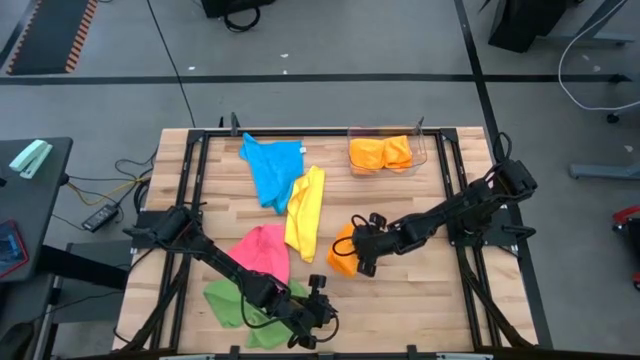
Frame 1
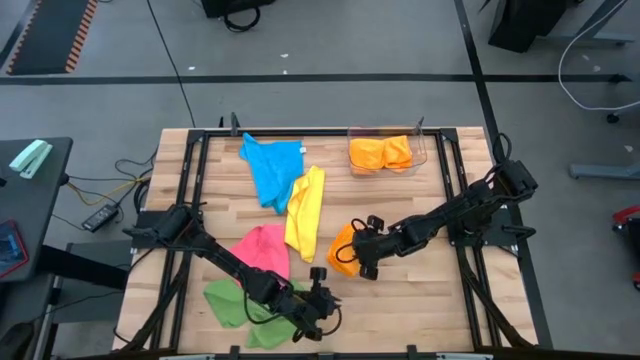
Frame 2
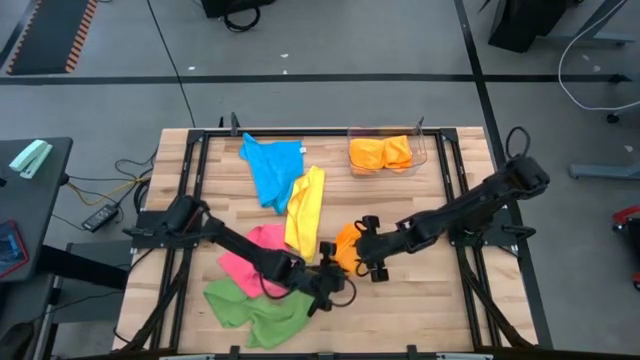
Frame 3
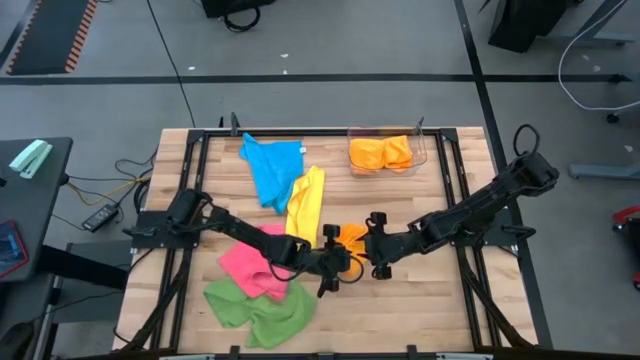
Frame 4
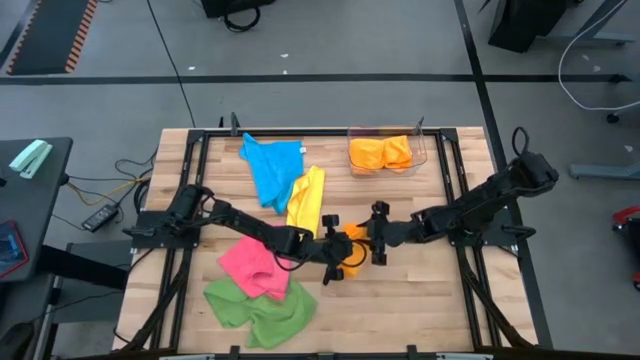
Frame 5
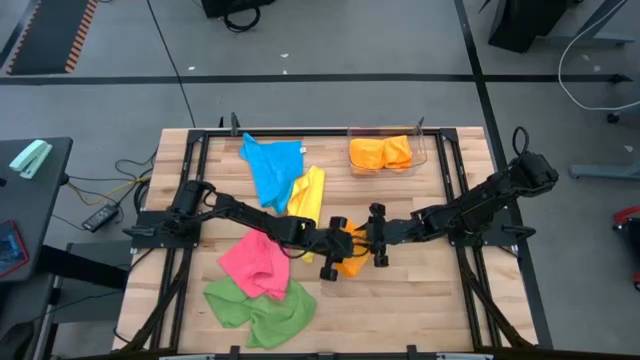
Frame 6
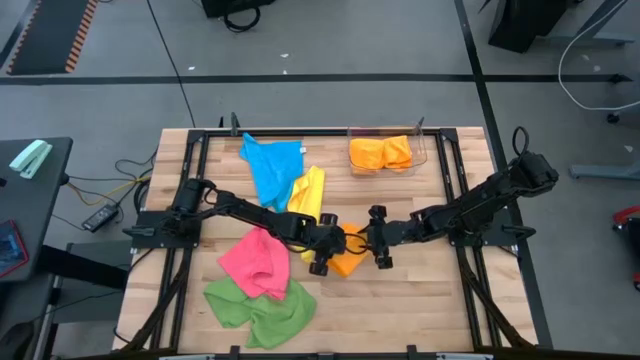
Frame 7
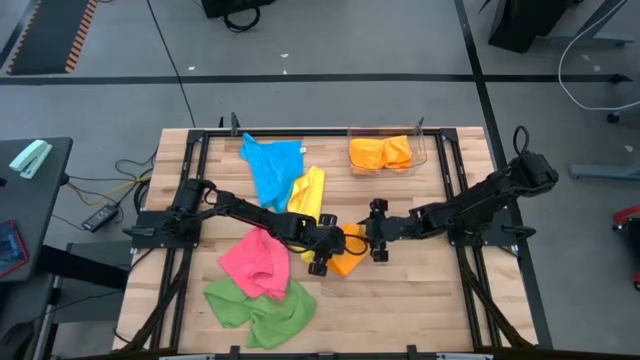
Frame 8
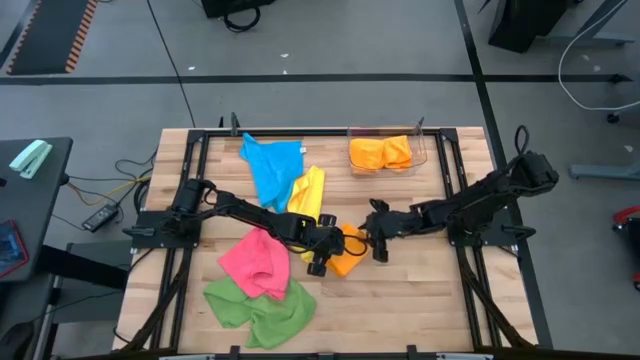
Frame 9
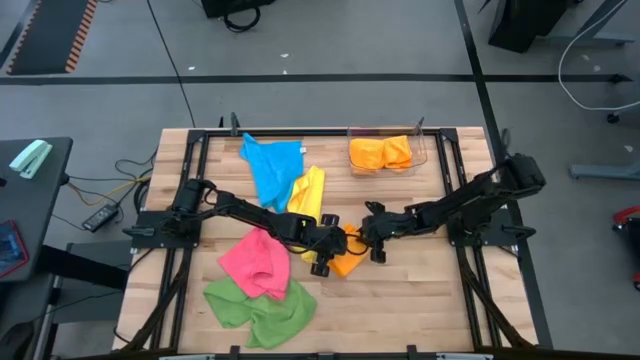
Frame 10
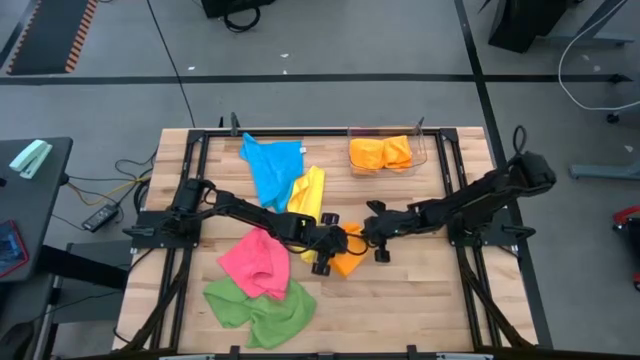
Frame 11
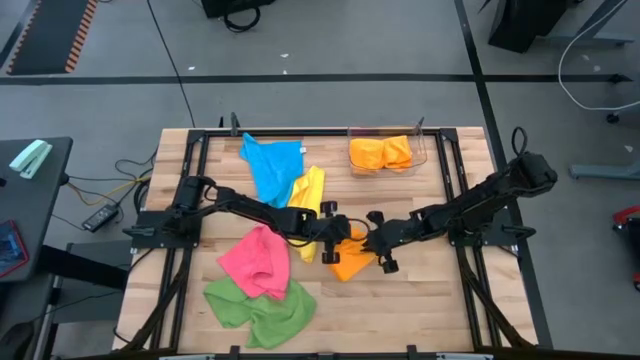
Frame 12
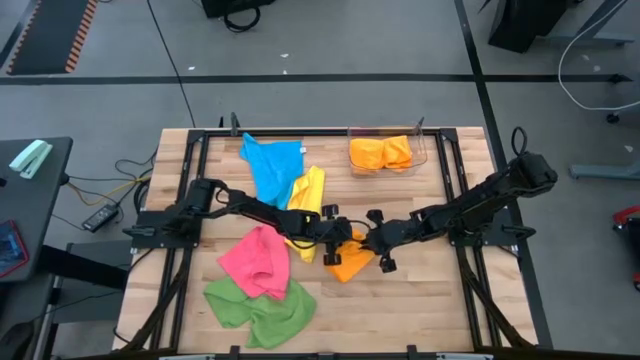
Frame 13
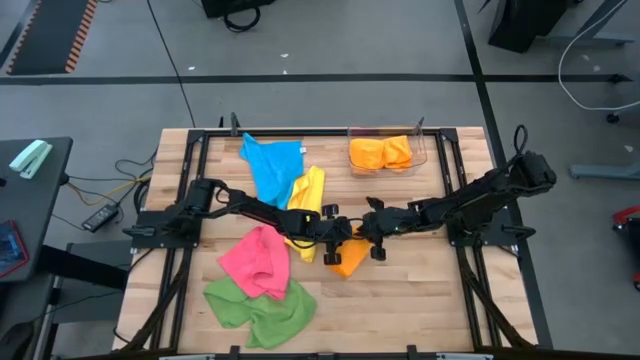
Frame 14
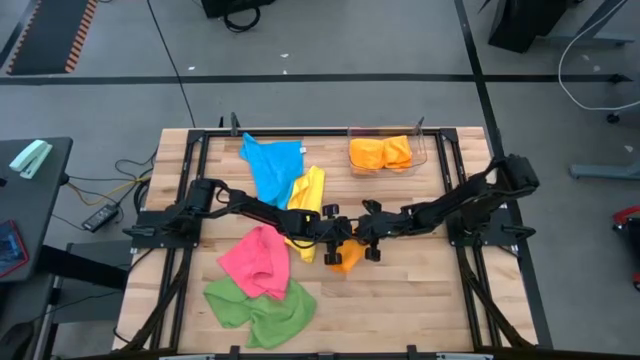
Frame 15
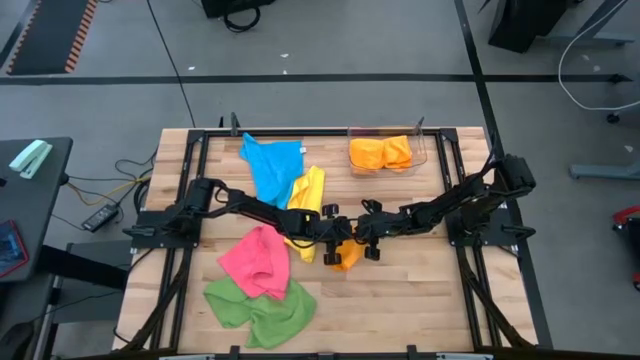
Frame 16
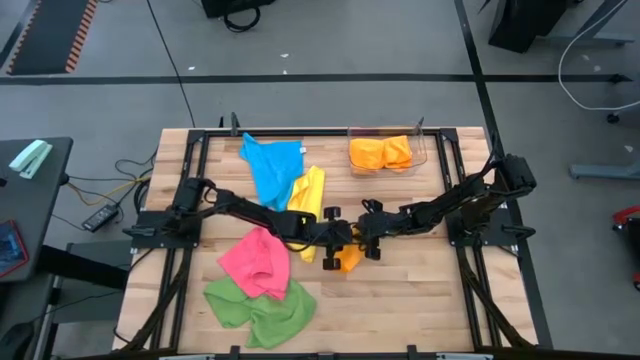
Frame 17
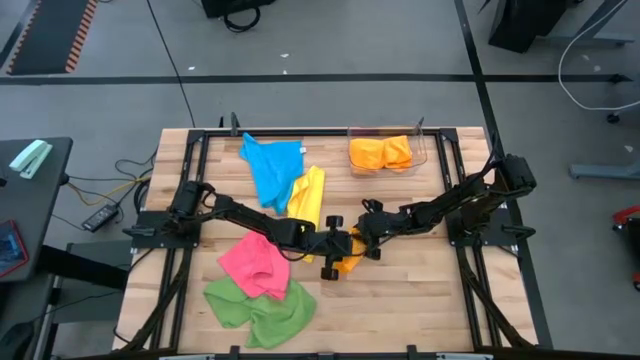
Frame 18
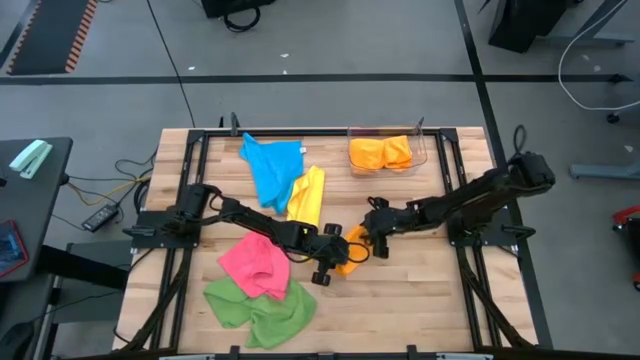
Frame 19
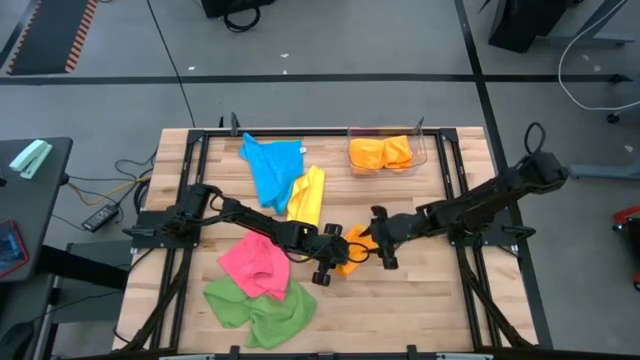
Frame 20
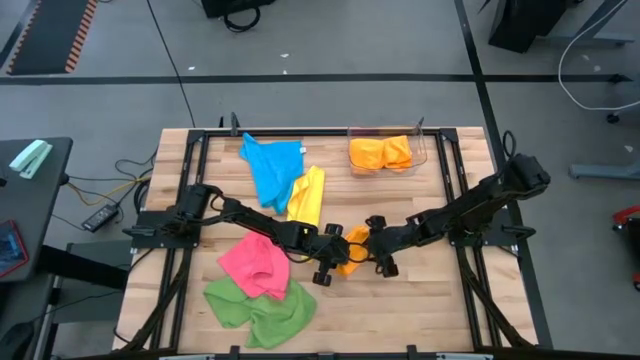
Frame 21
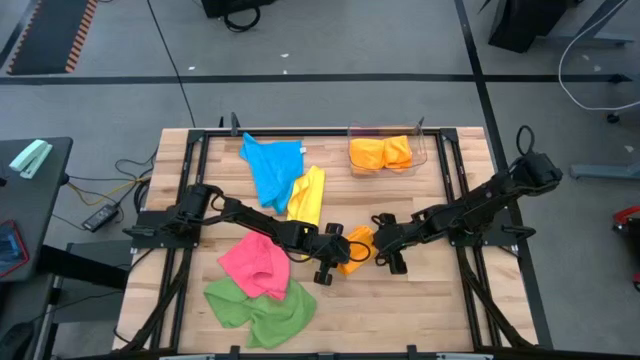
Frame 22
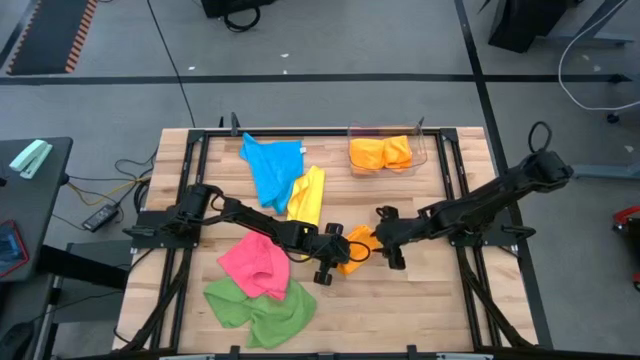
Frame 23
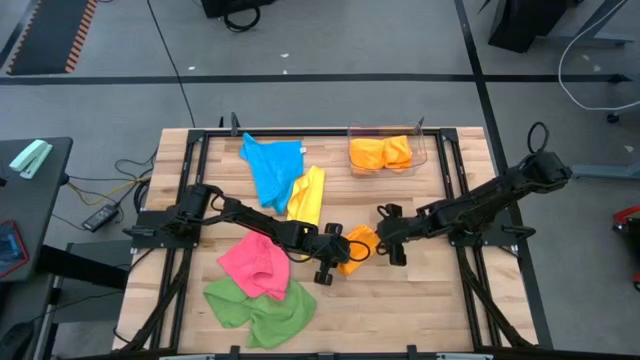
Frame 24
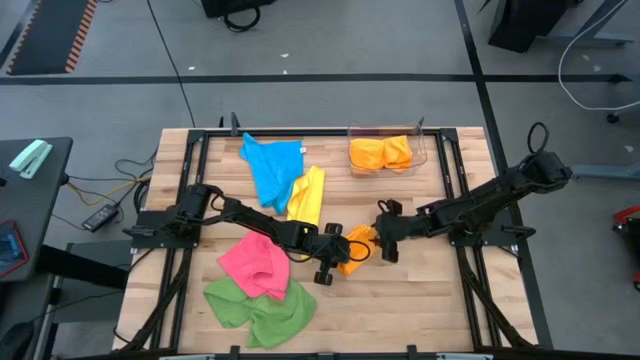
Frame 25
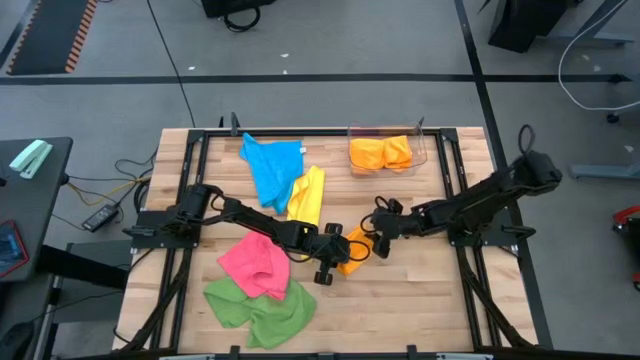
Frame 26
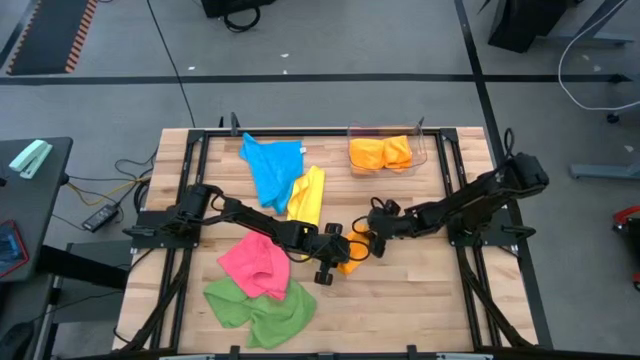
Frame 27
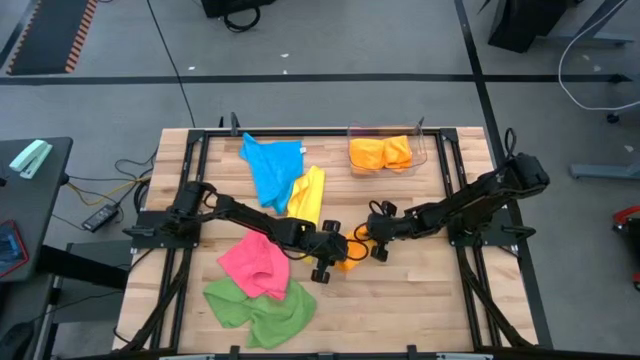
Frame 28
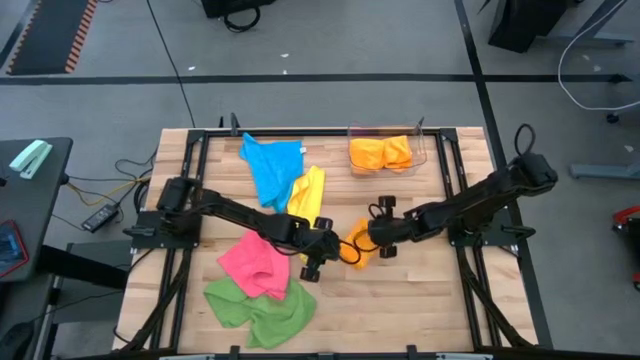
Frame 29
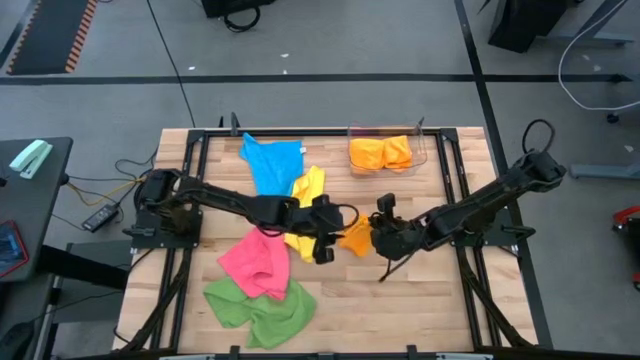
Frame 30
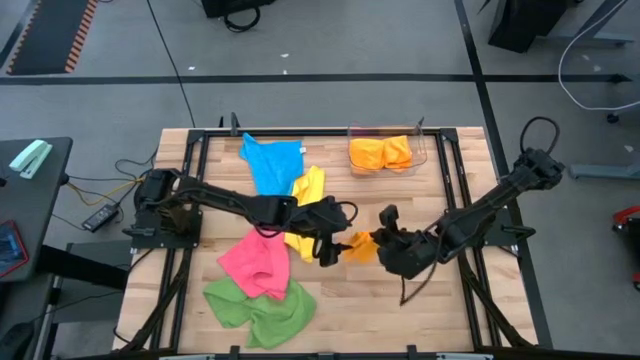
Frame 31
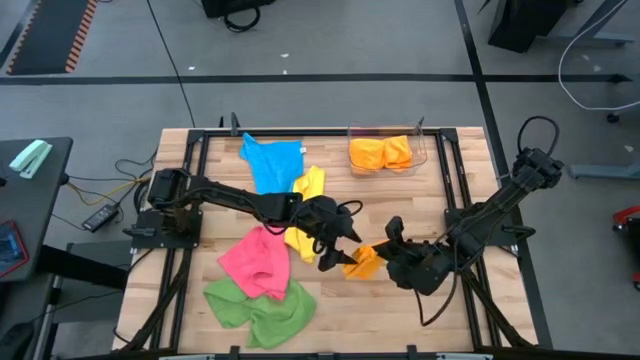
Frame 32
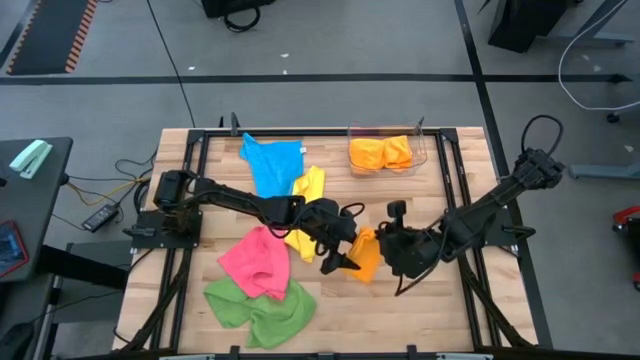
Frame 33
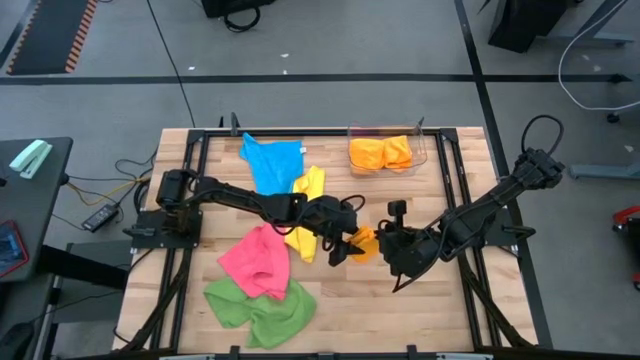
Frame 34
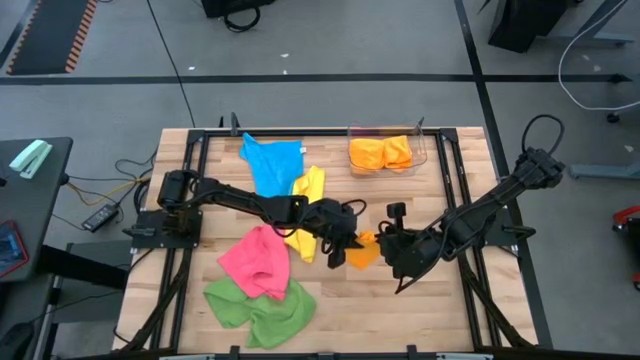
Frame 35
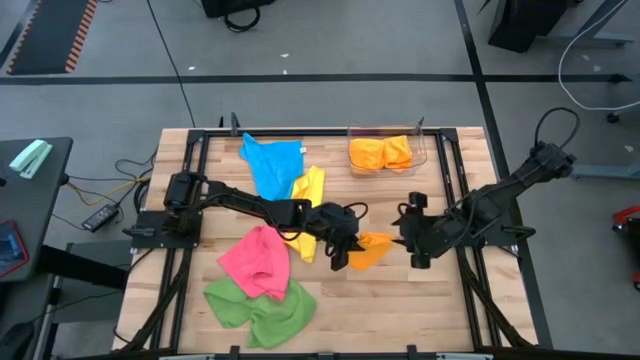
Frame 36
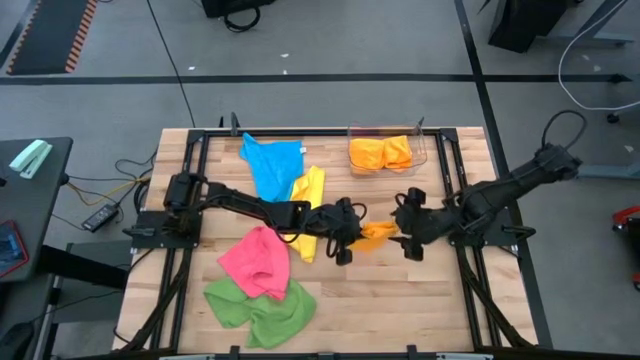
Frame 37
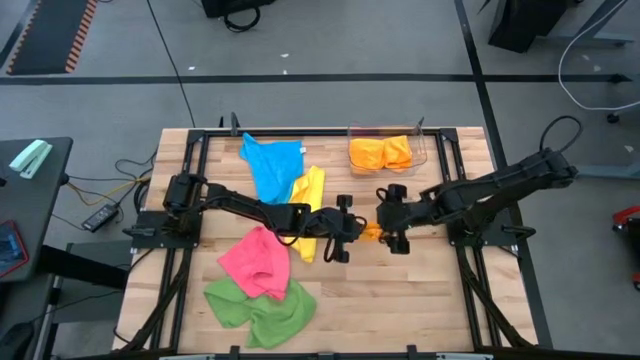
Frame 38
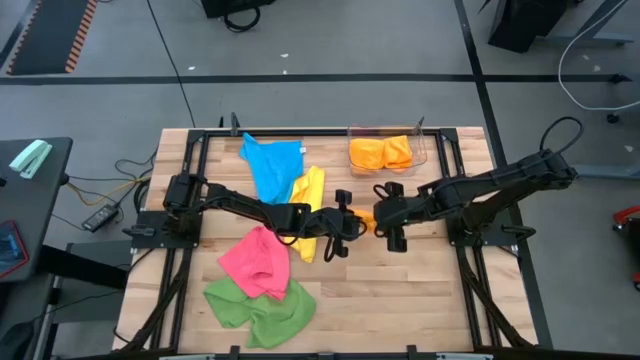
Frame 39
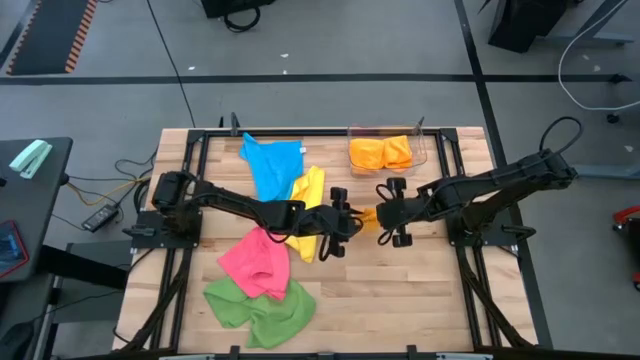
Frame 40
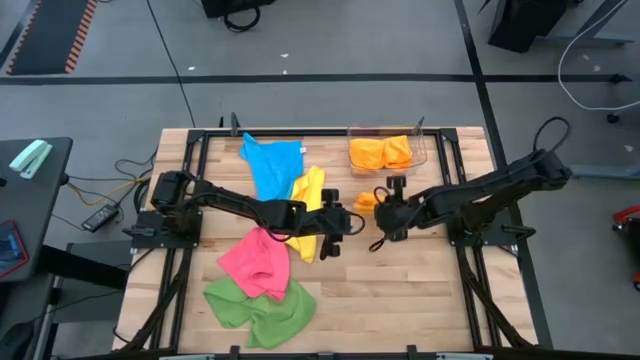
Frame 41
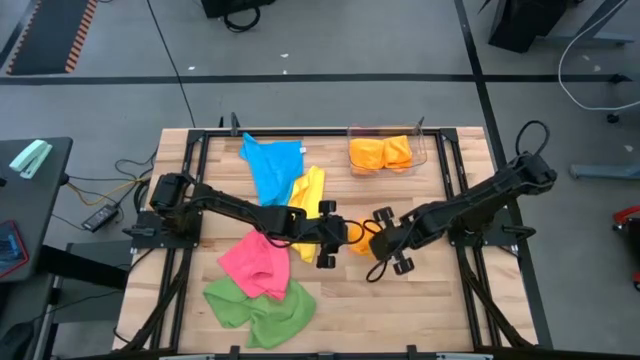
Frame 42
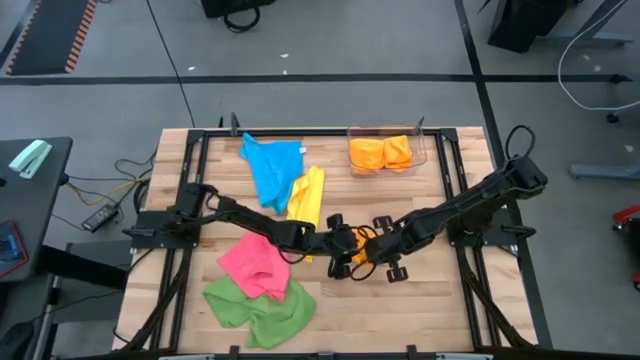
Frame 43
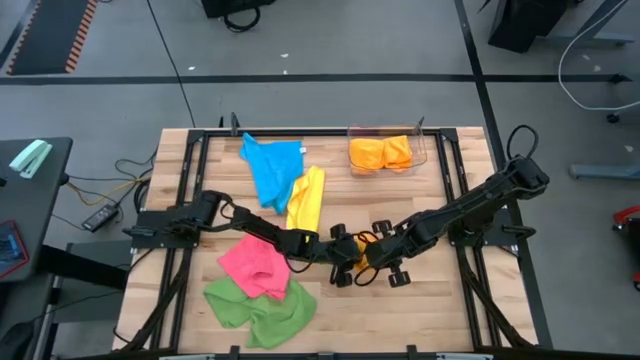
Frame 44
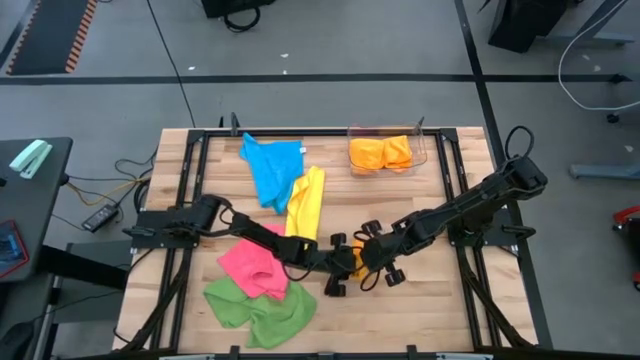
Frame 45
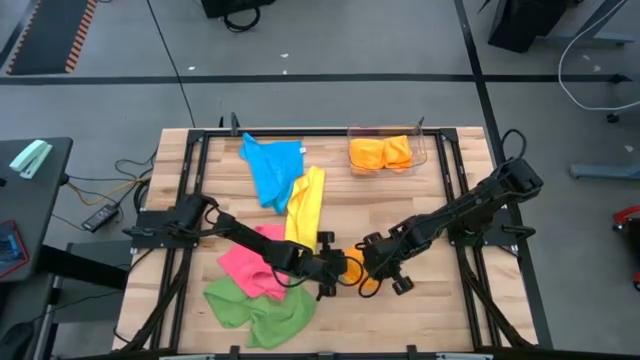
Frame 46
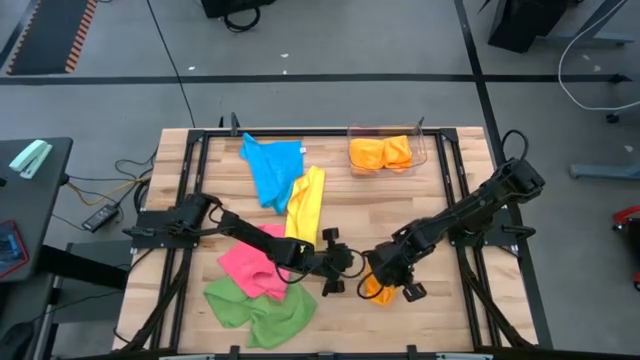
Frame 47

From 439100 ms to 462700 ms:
Task: Fold microfiber towels
Fold the orange microfiber cloth
